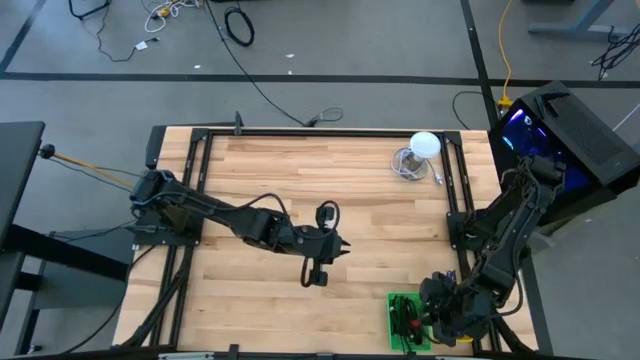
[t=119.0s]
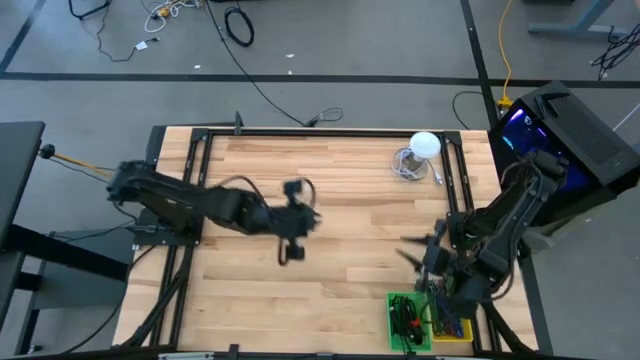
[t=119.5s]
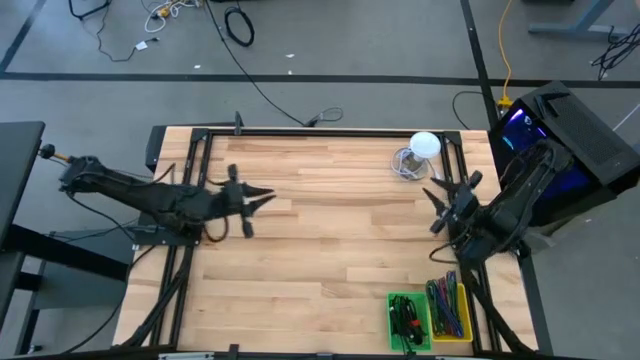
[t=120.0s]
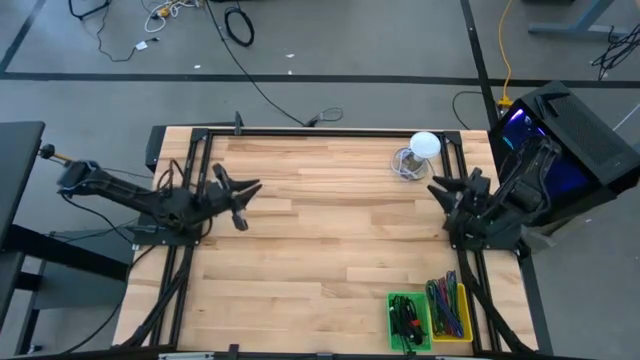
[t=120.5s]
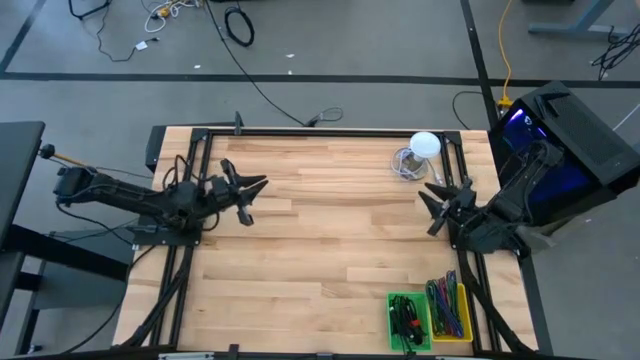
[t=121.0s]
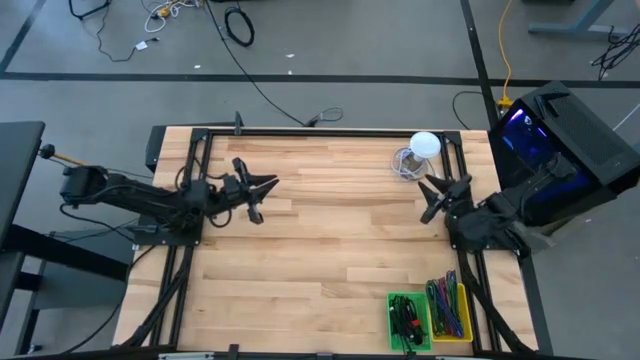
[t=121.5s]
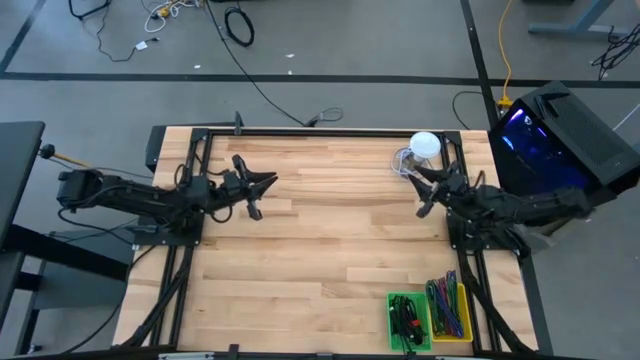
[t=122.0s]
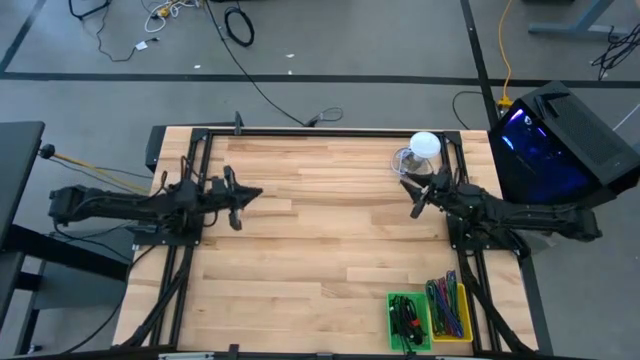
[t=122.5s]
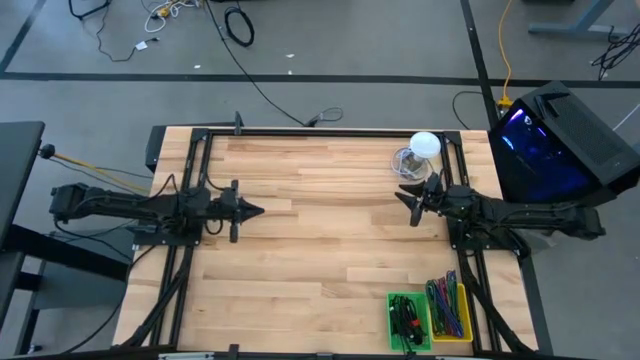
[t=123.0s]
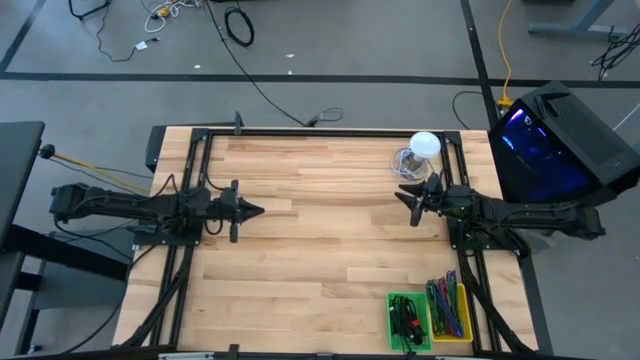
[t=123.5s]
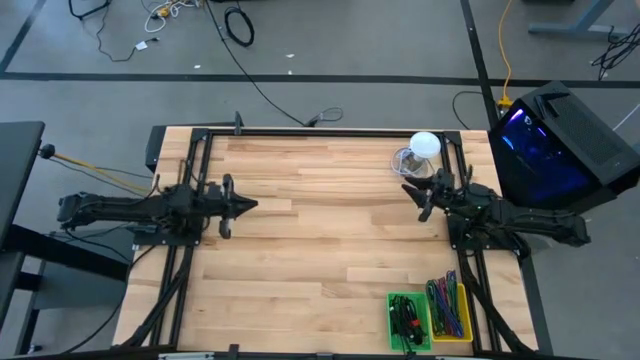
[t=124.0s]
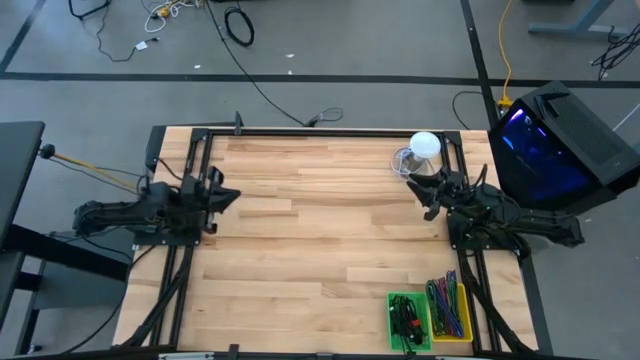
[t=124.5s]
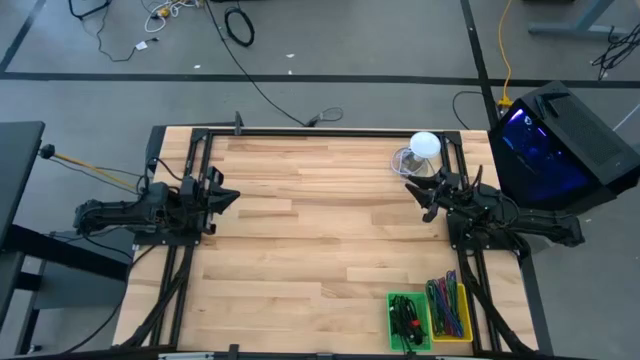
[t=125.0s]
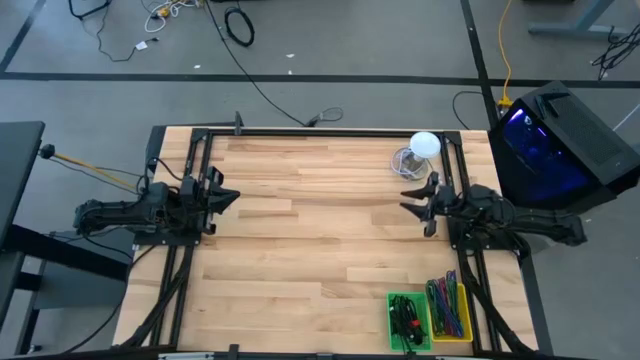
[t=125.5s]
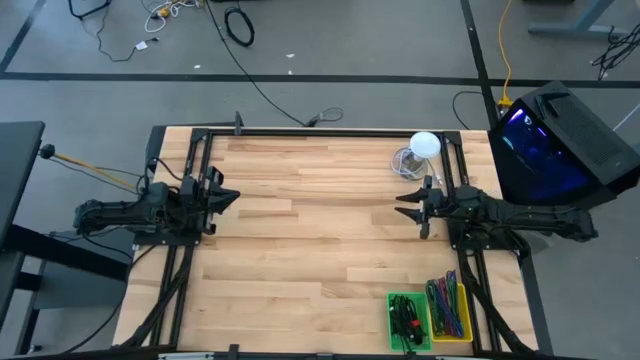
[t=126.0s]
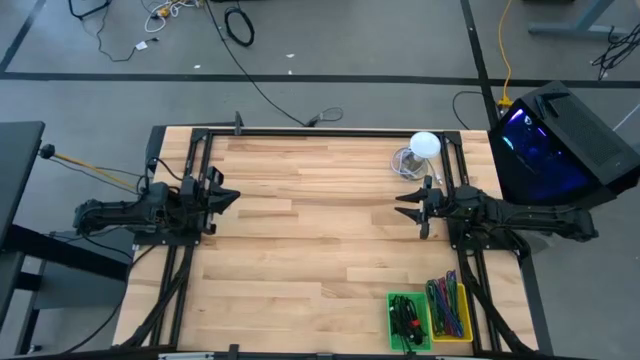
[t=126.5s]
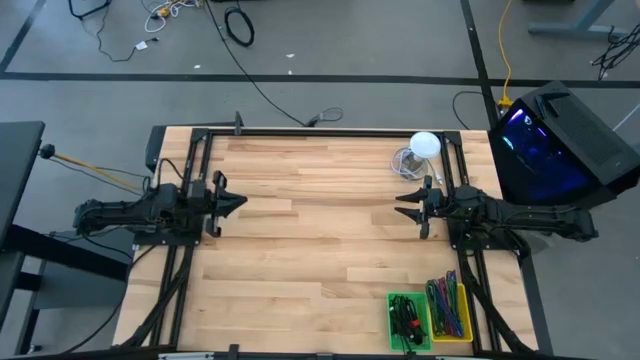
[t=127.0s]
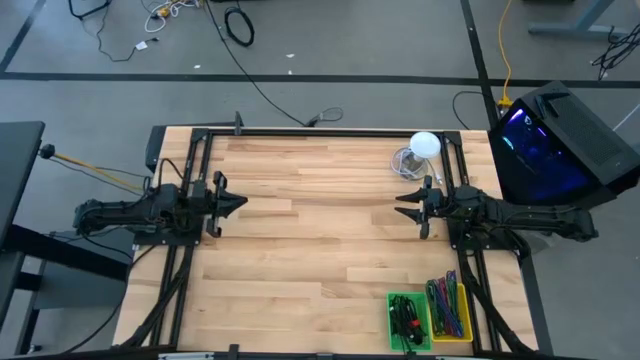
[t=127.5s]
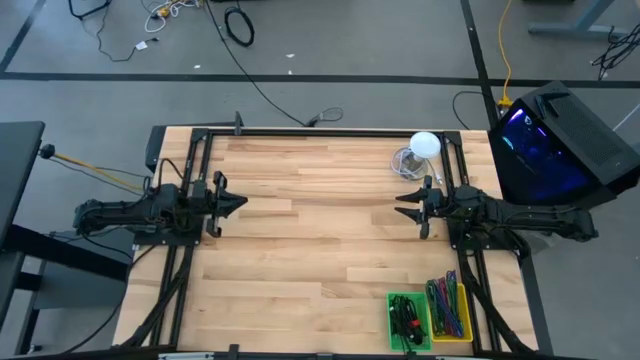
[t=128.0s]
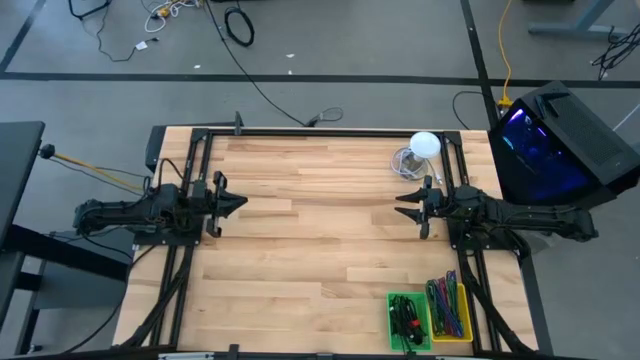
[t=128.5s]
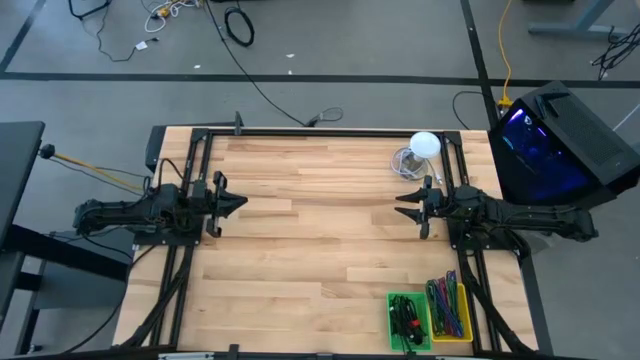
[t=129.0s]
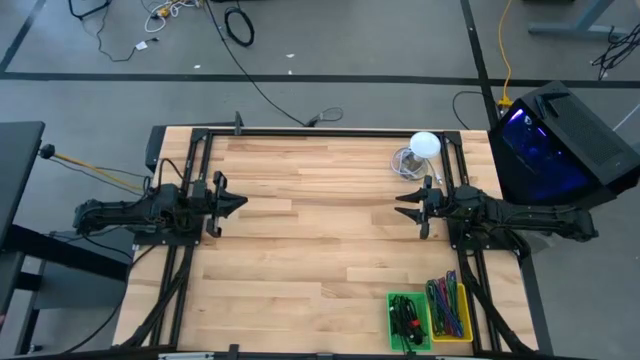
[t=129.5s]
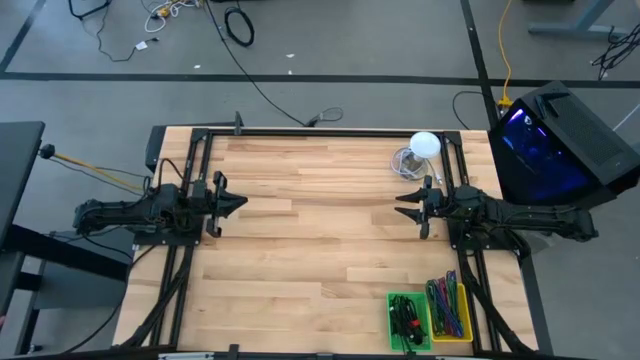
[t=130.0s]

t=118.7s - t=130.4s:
Task: Pick & Place USB Port
Return to Home Position

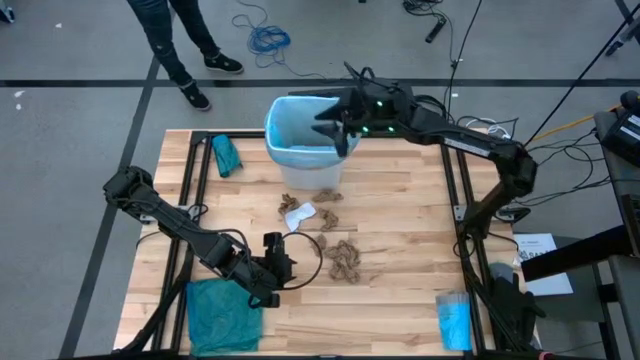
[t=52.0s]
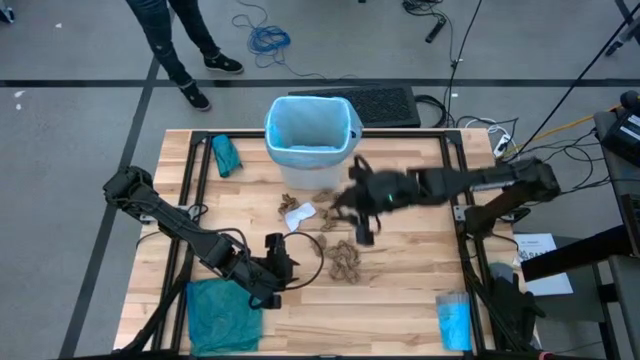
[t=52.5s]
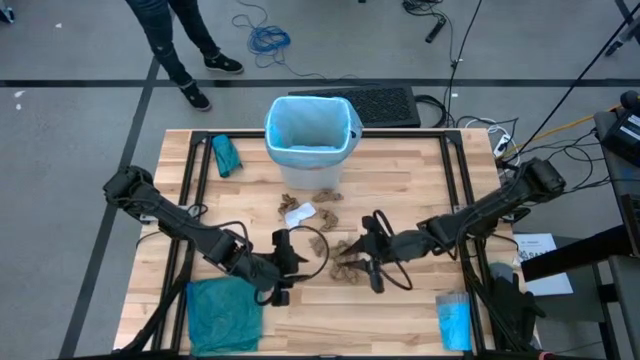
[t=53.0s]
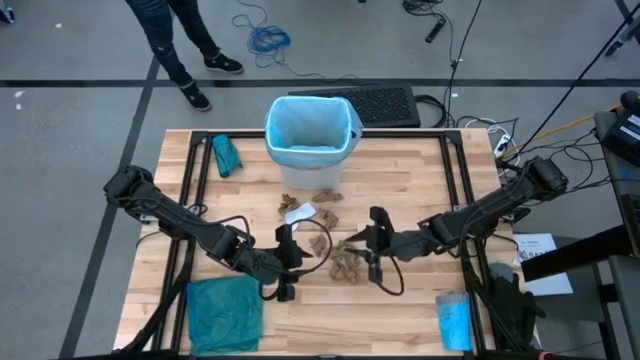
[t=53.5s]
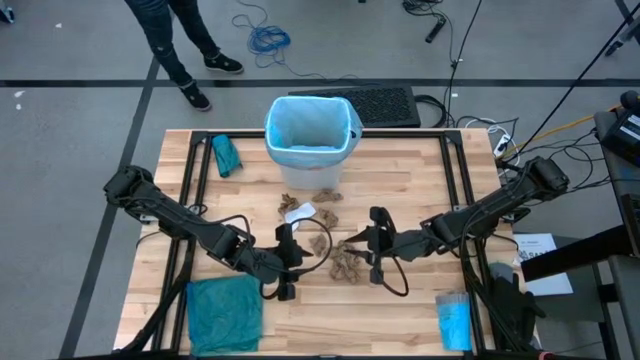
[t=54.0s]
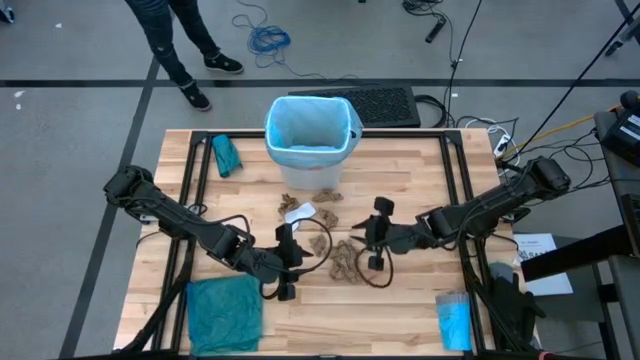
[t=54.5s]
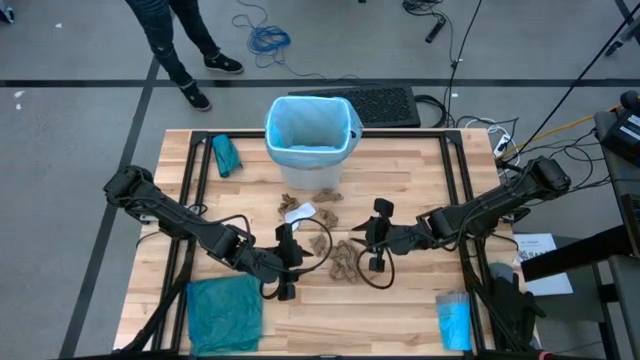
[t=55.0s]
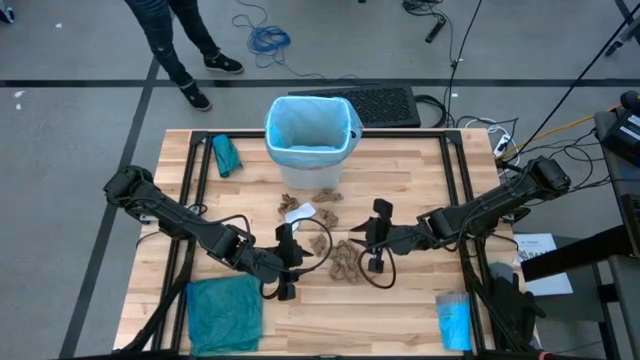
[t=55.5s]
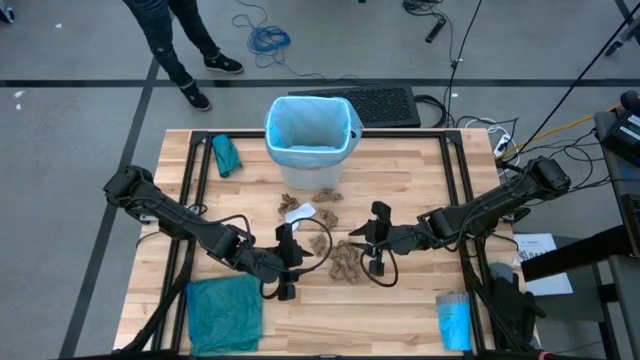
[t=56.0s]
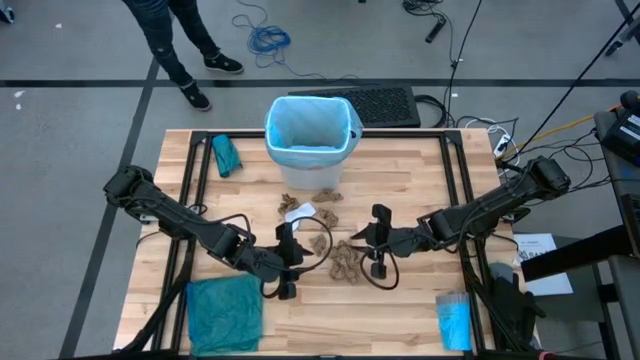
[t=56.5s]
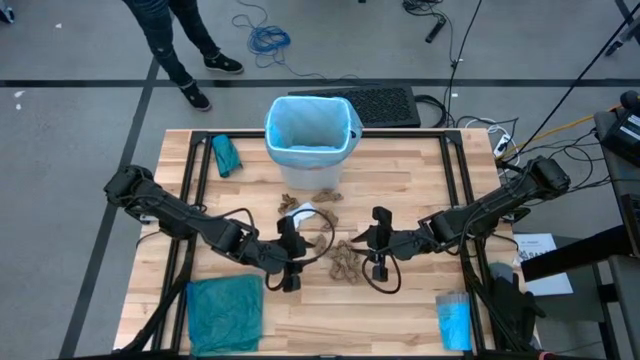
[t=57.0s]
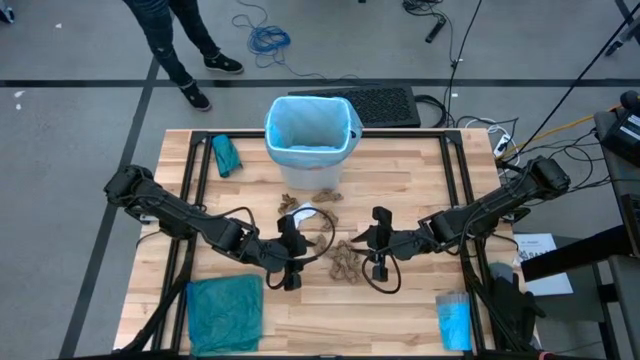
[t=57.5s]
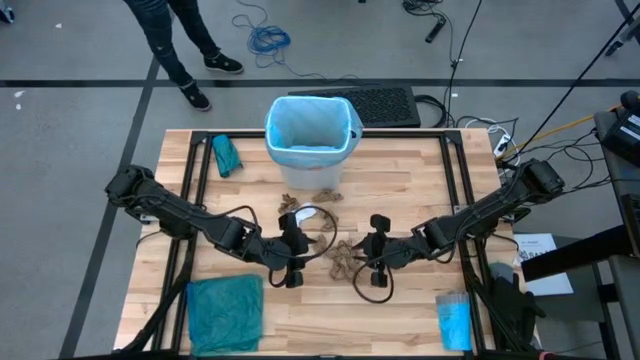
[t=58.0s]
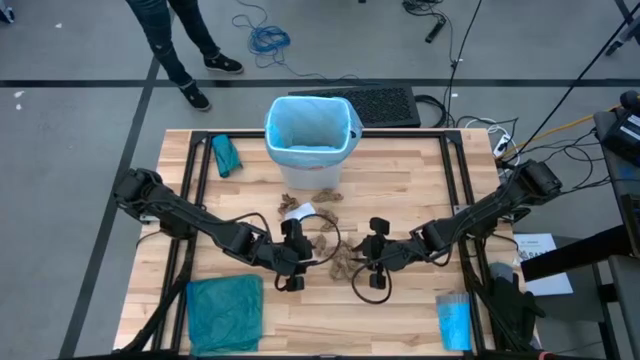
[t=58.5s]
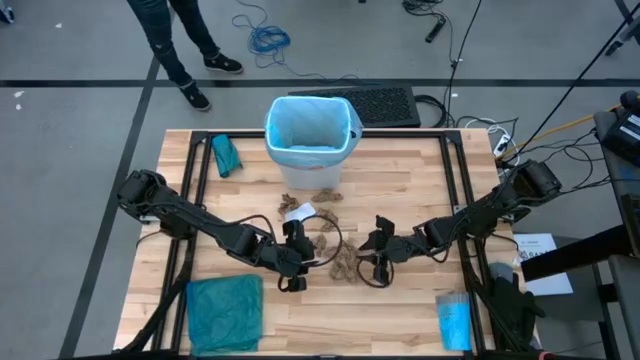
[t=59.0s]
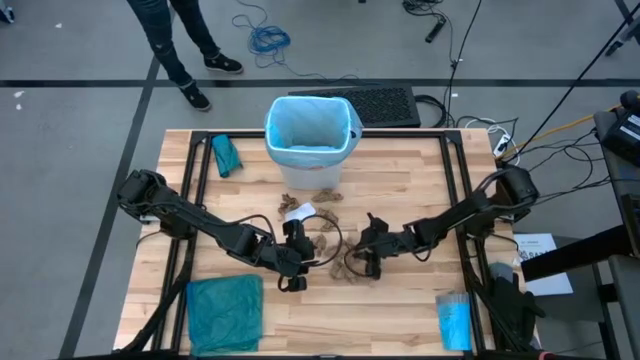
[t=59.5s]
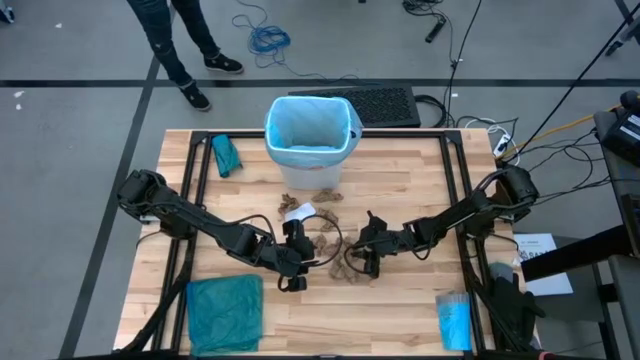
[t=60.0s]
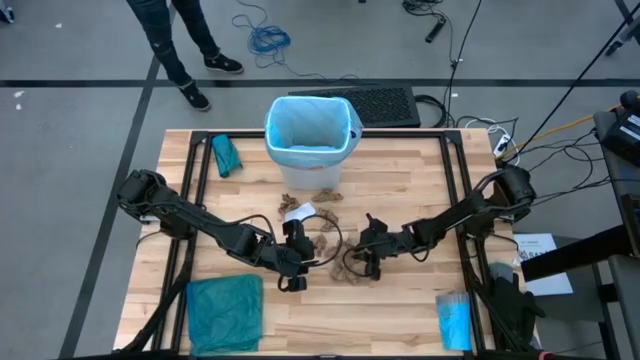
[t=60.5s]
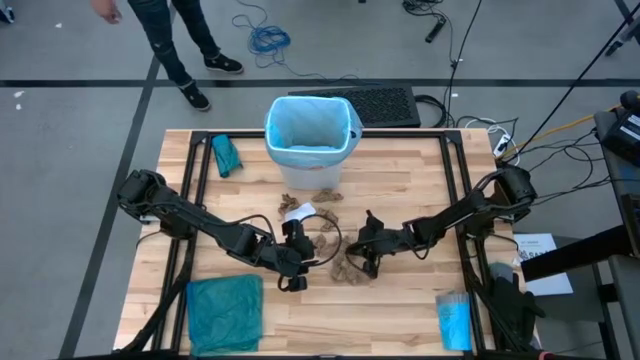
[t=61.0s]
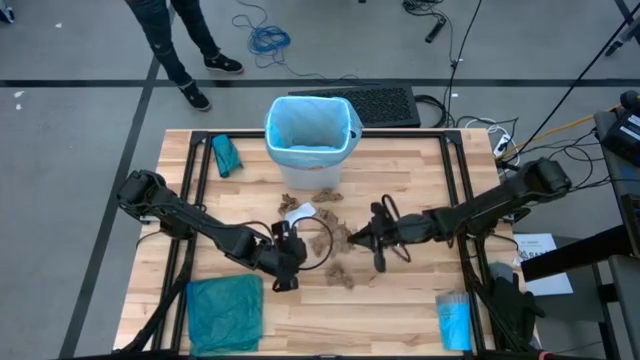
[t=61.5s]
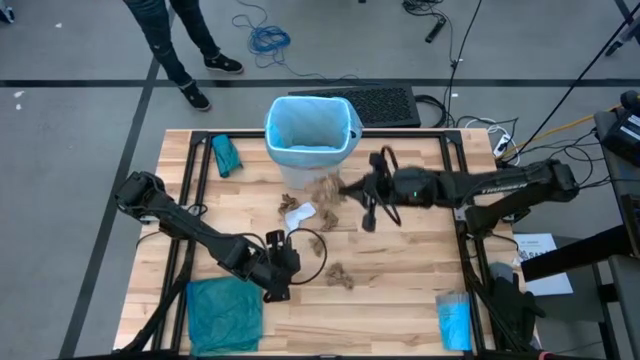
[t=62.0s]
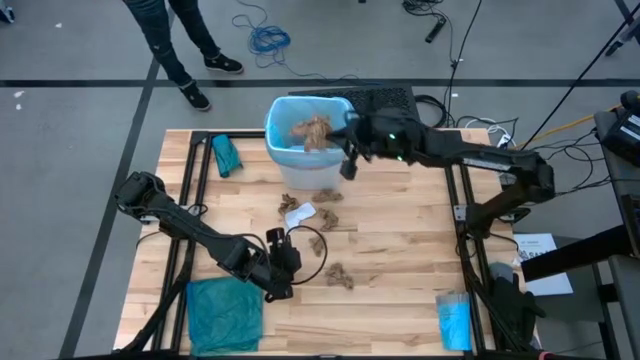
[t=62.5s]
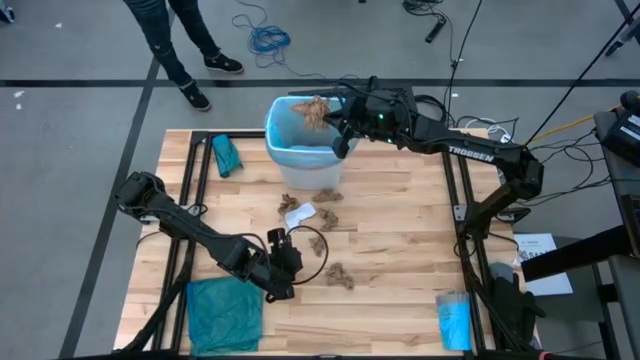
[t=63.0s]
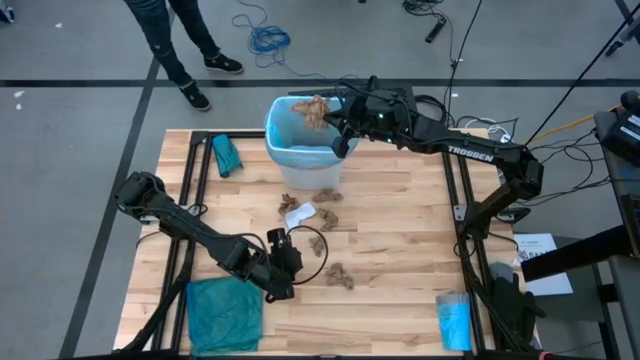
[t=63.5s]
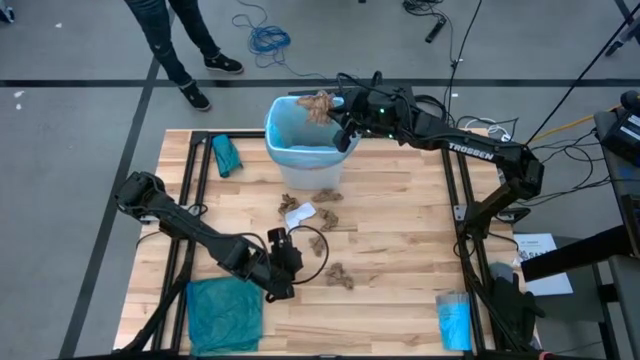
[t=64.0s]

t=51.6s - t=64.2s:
Task: place trash/remove bag and relplace
Put the brown paper into the blue trash bag inside the white trash bin
